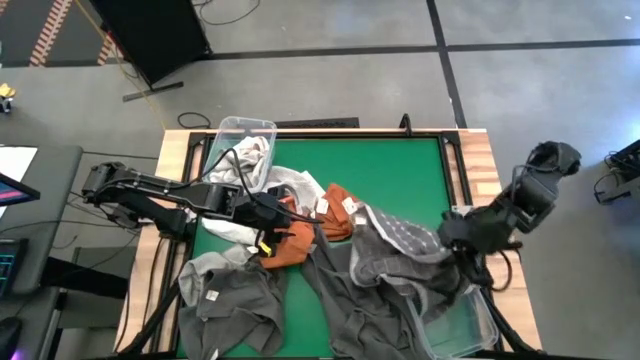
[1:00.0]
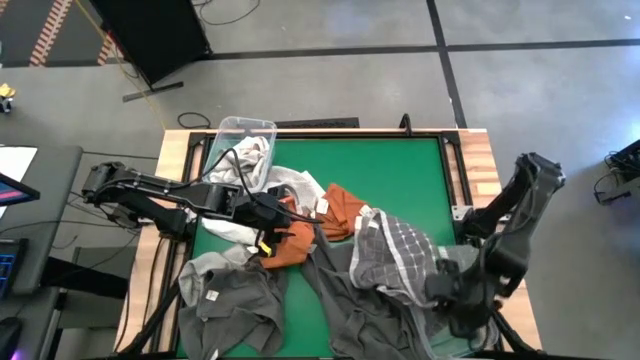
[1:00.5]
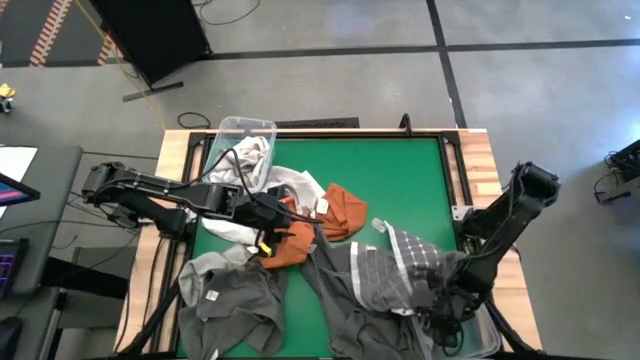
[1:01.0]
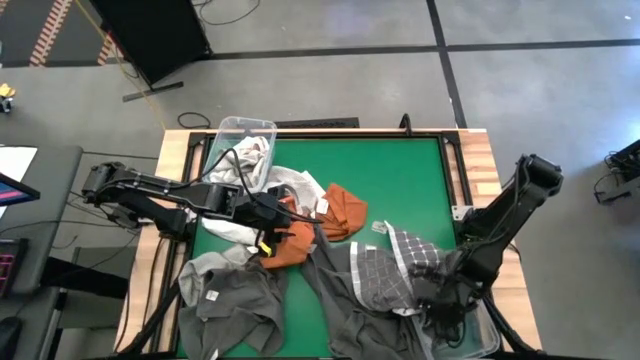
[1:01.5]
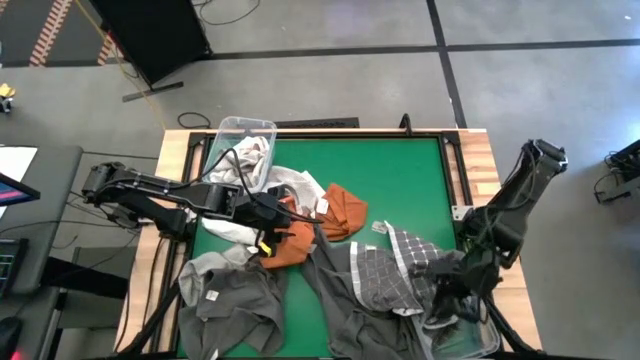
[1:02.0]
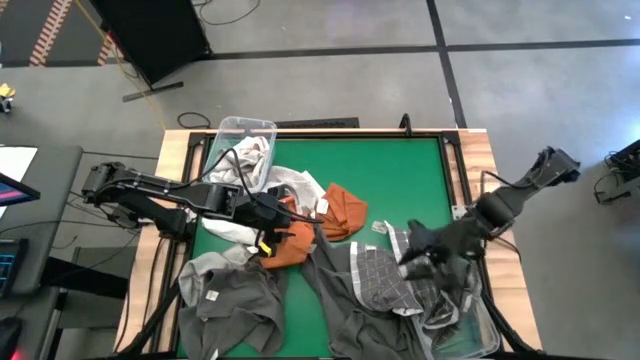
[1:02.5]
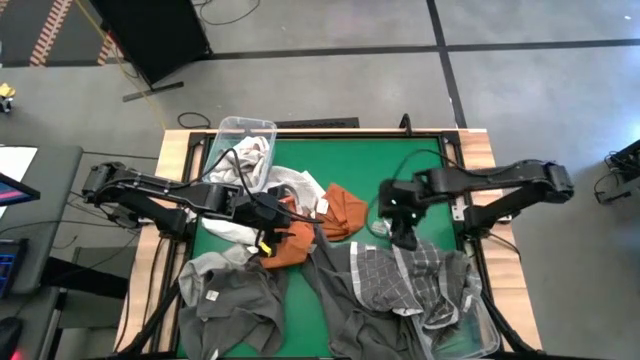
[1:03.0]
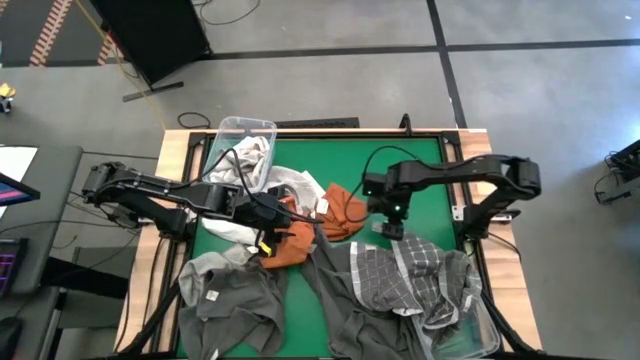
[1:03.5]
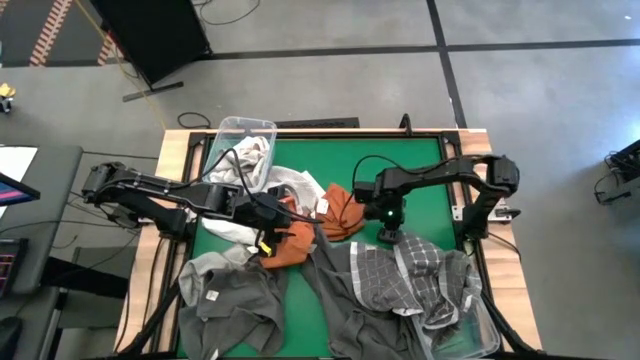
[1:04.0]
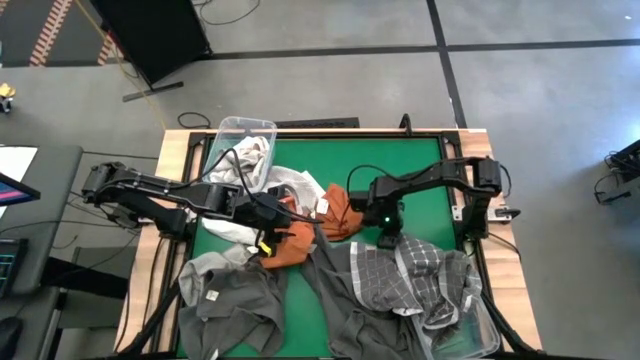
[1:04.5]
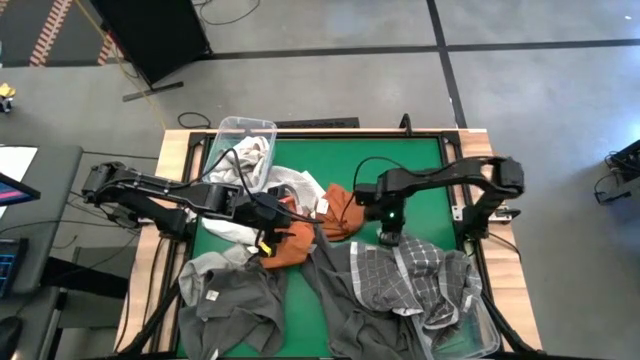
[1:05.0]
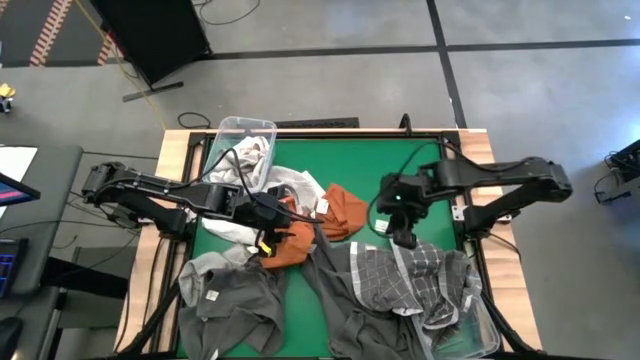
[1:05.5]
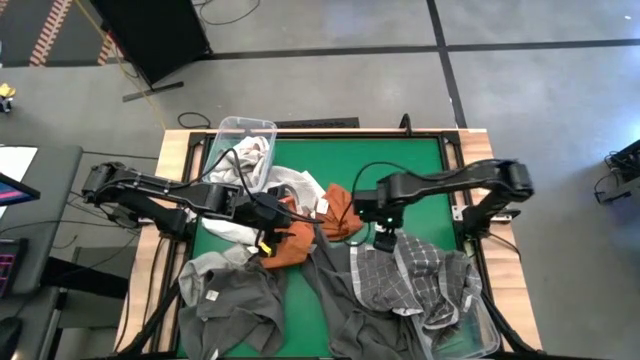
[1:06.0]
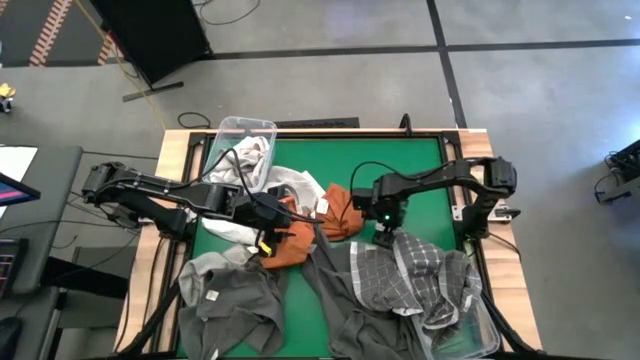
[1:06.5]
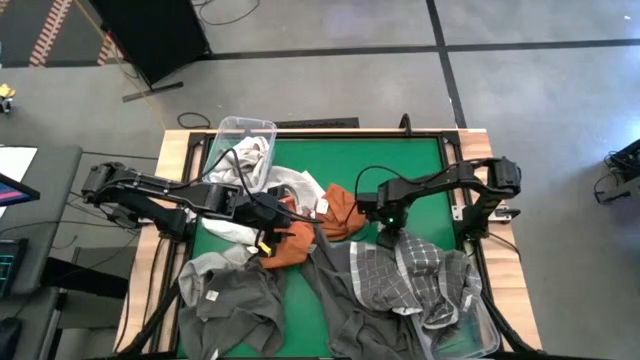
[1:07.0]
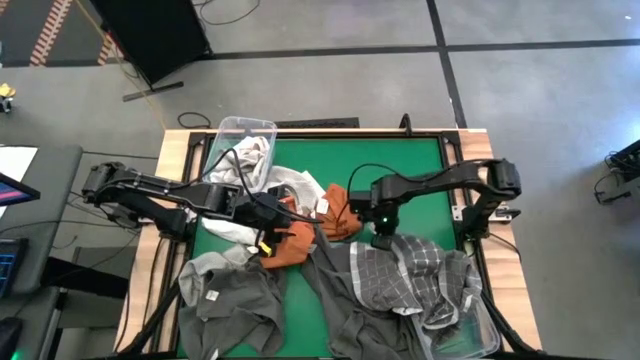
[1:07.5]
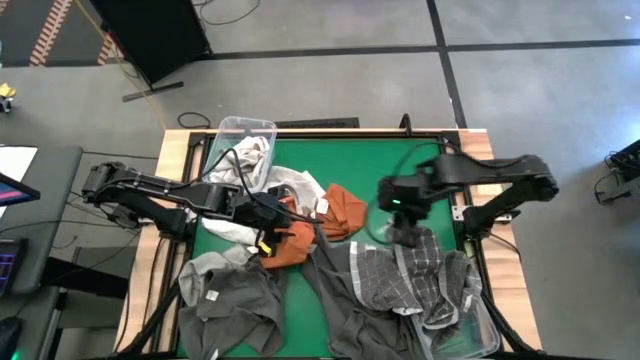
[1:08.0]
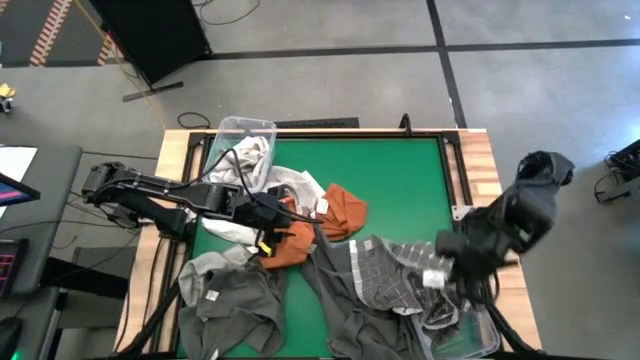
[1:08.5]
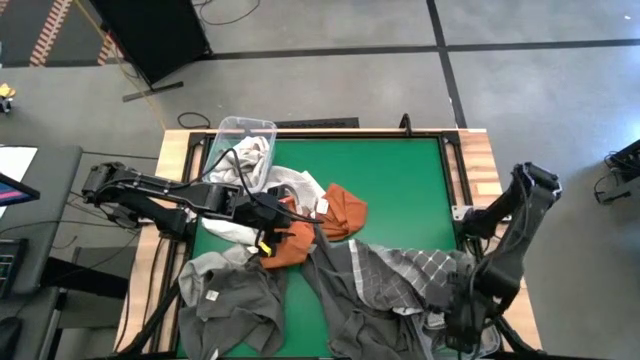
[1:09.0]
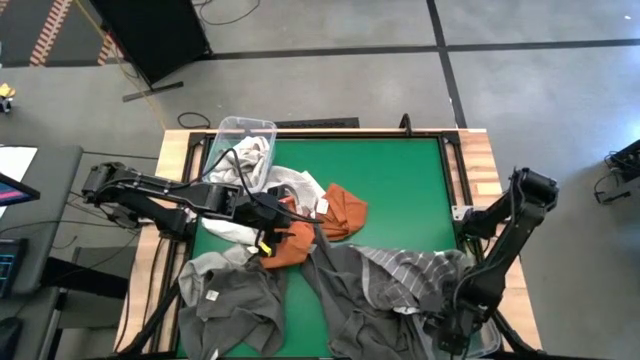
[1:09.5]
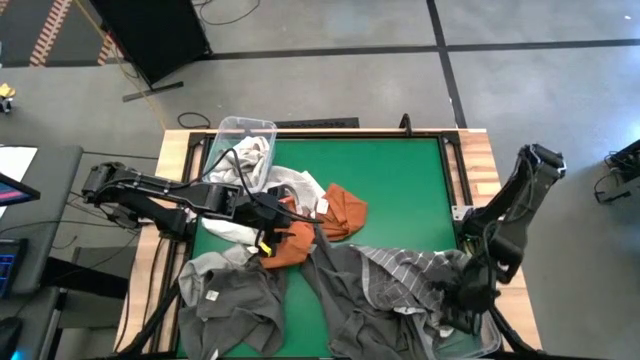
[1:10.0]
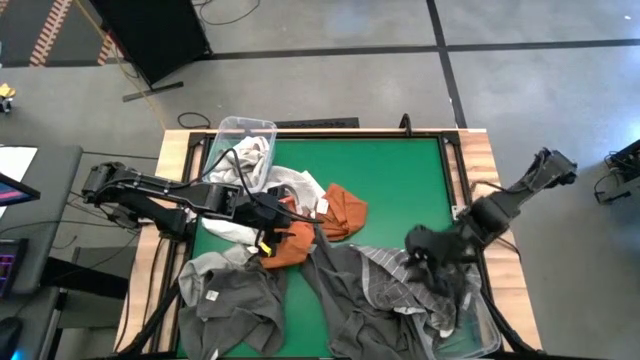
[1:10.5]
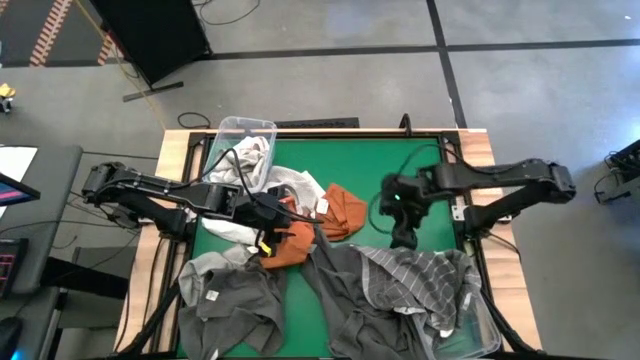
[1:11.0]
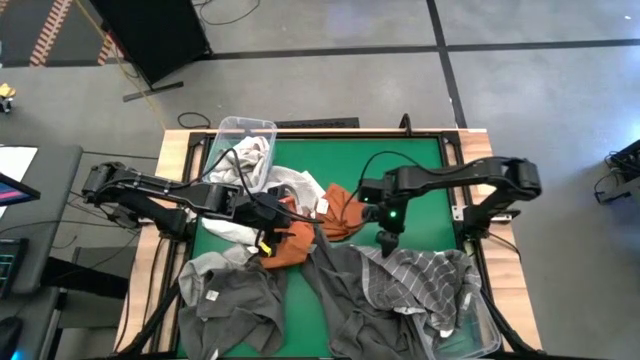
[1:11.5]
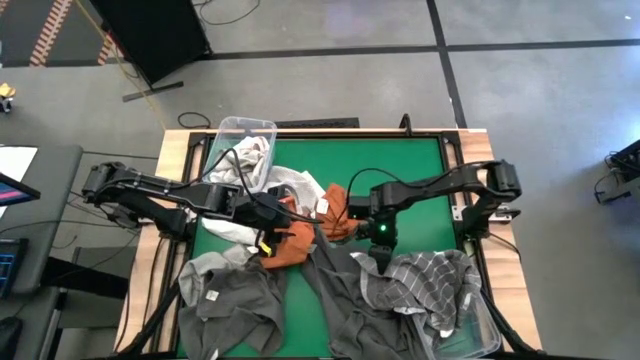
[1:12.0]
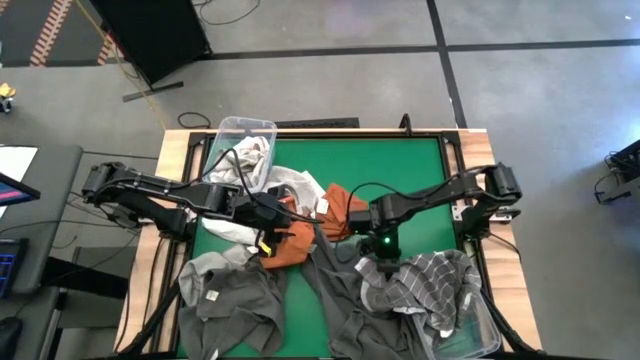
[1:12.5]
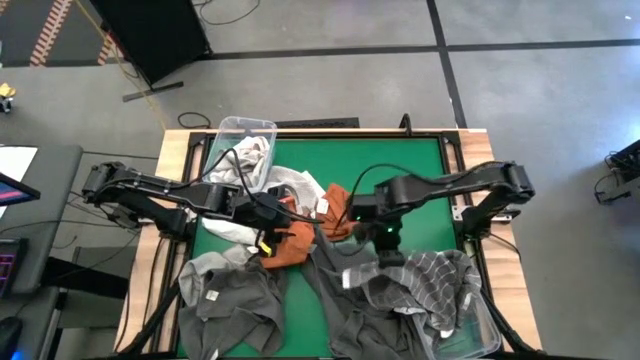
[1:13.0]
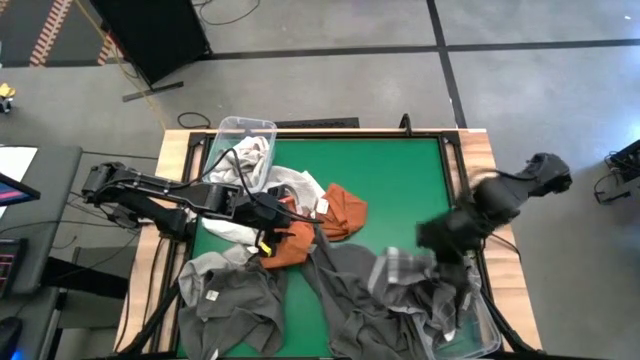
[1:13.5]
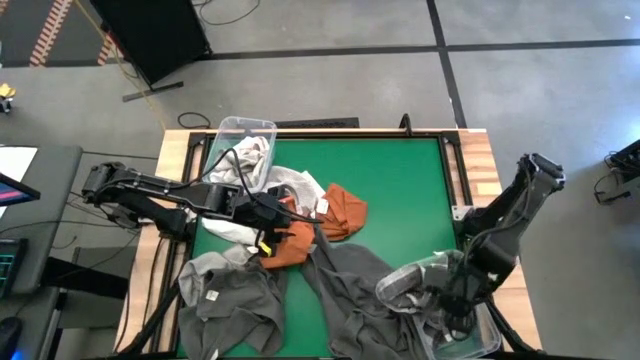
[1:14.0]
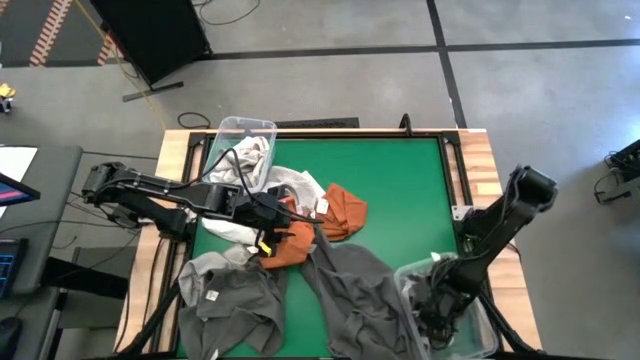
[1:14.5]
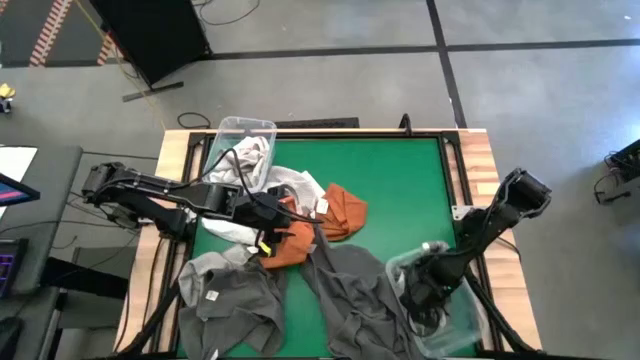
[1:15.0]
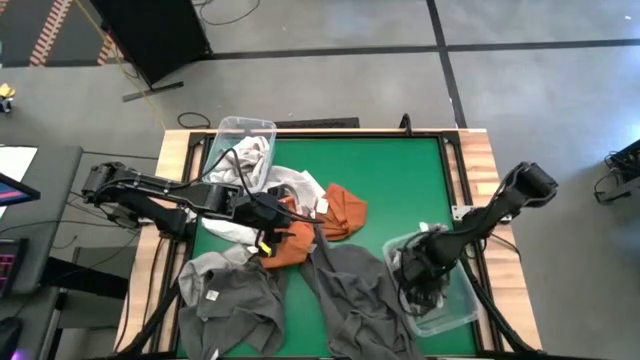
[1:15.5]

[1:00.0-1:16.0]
Task: Sort towels by color in basket
Put the gray patterned towel into the bottom transparent bin

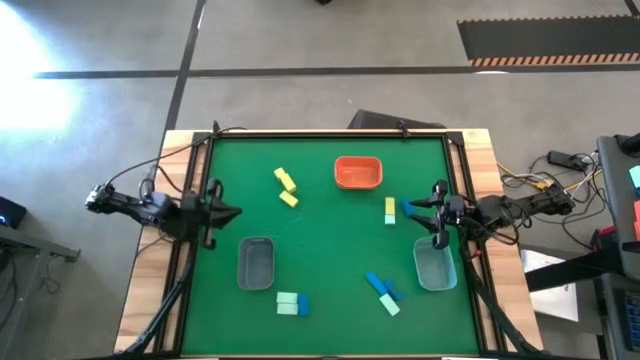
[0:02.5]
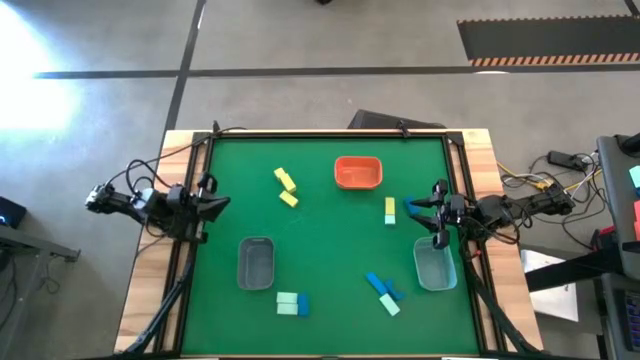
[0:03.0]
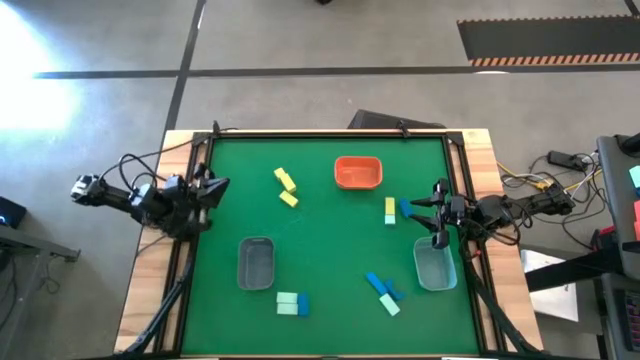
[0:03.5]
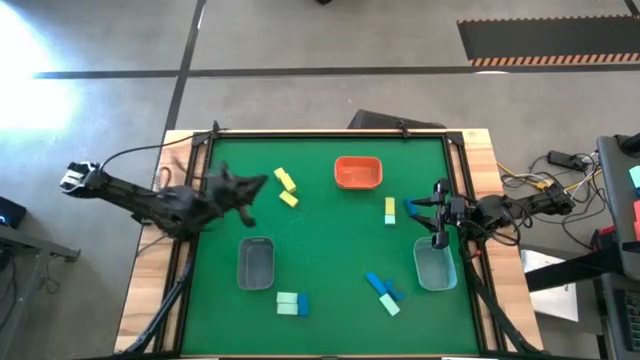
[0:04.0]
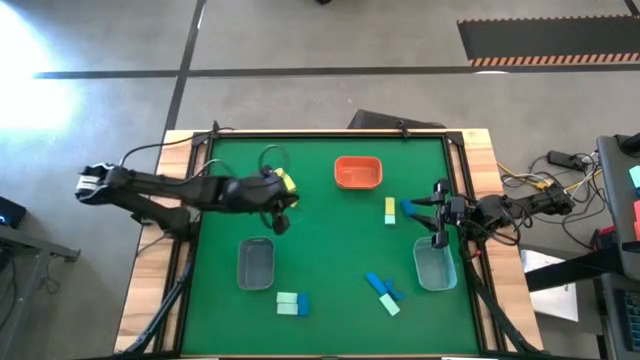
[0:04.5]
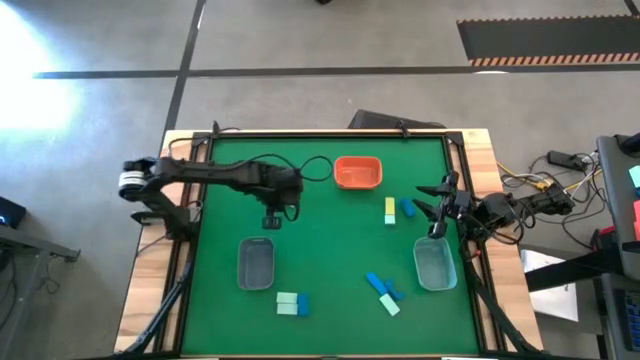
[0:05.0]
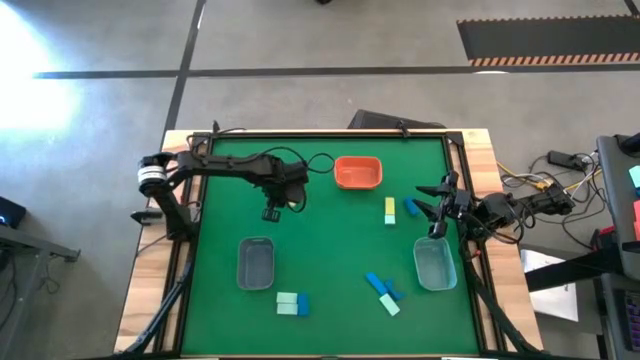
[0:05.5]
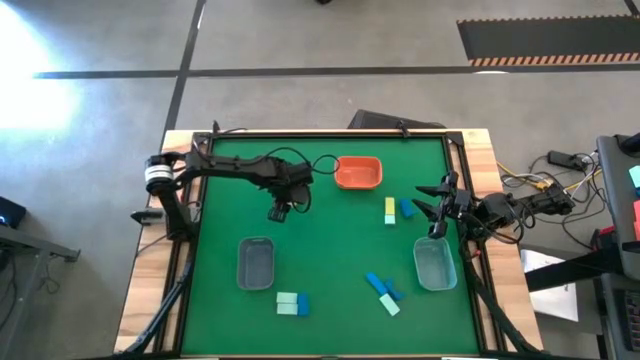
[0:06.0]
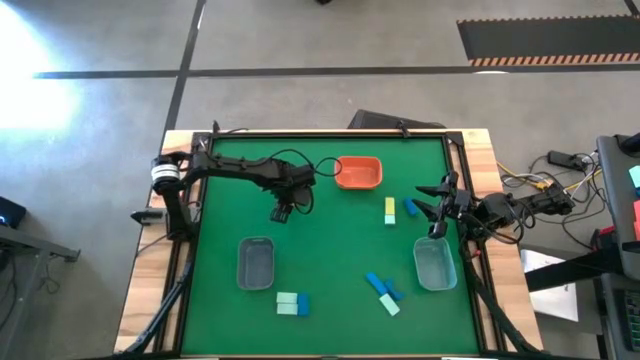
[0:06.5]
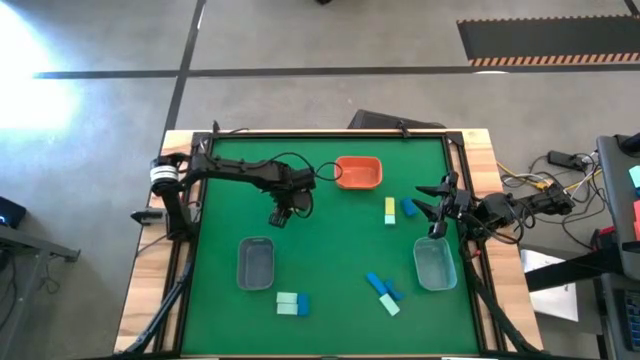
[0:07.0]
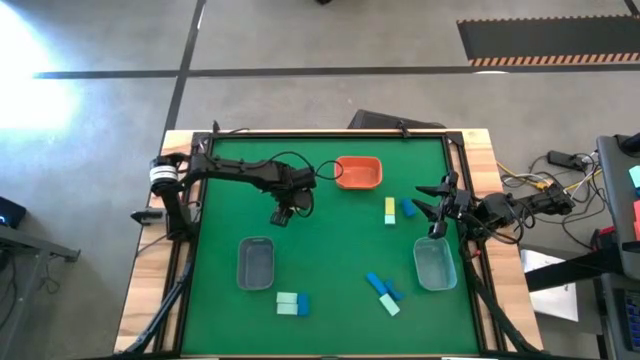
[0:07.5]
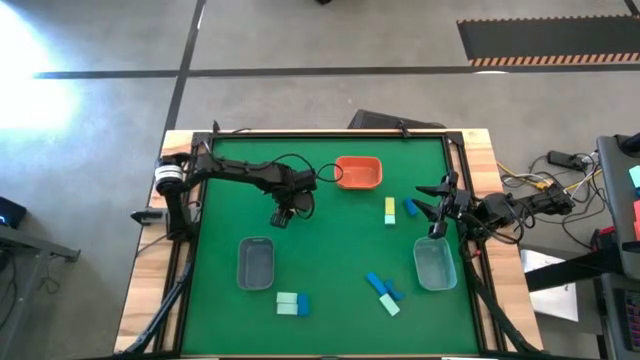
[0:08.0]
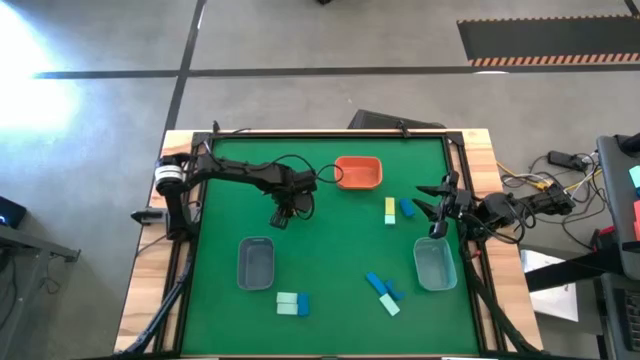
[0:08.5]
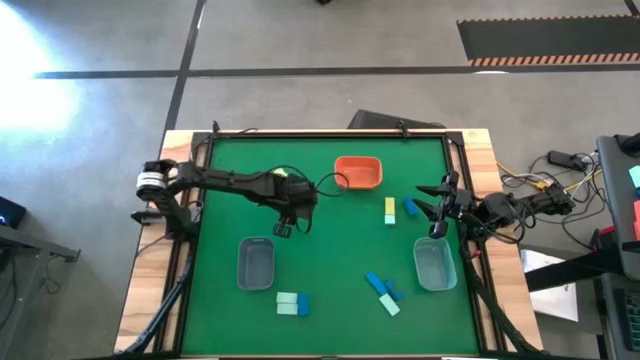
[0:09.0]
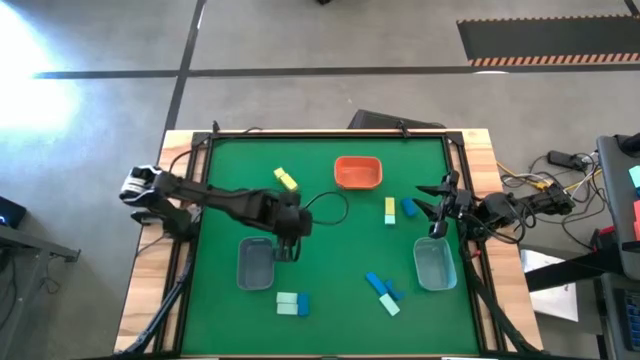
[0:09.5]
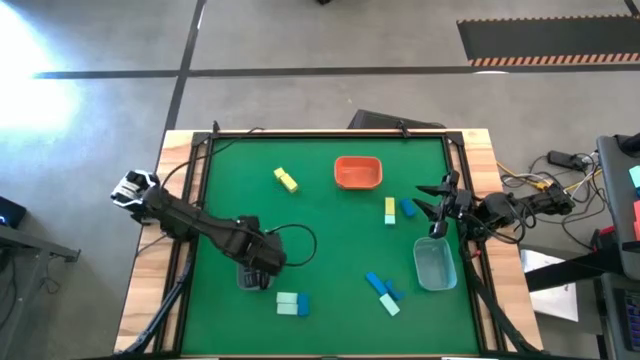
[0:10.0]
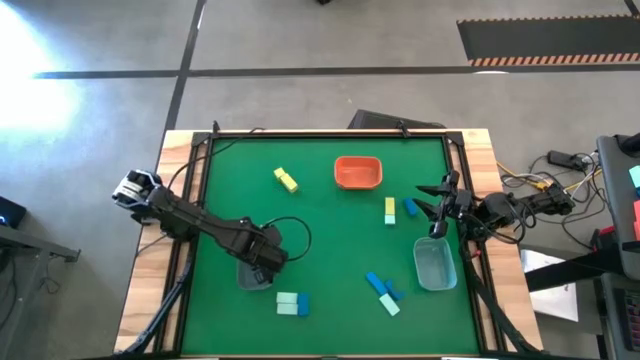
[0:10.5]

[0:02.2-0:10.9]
Task: Sort & place blocks by color
Put the light green block into the gray bin
